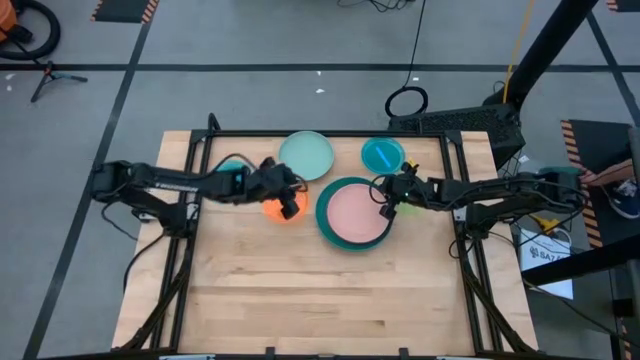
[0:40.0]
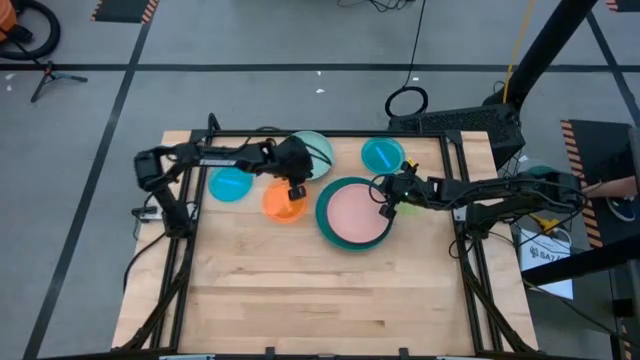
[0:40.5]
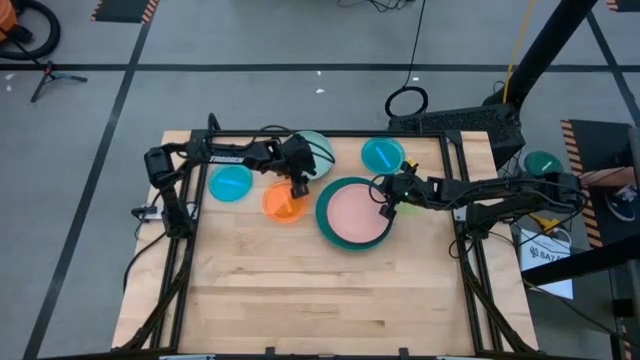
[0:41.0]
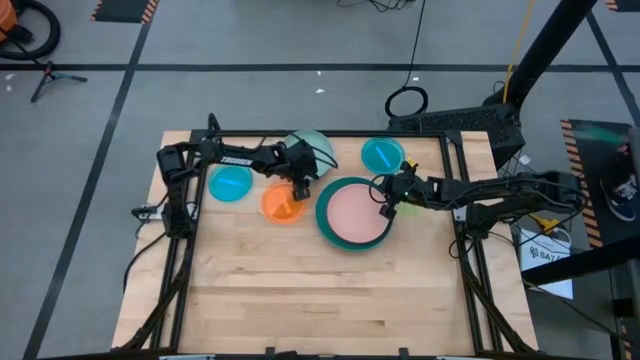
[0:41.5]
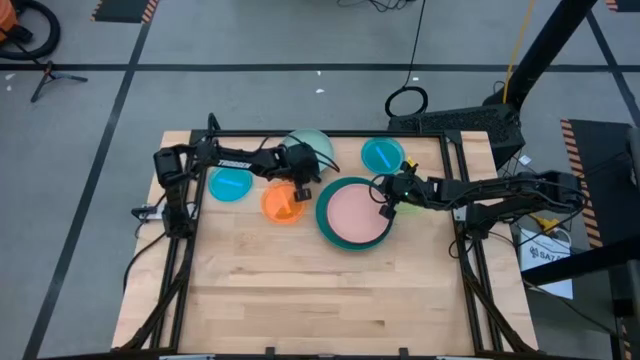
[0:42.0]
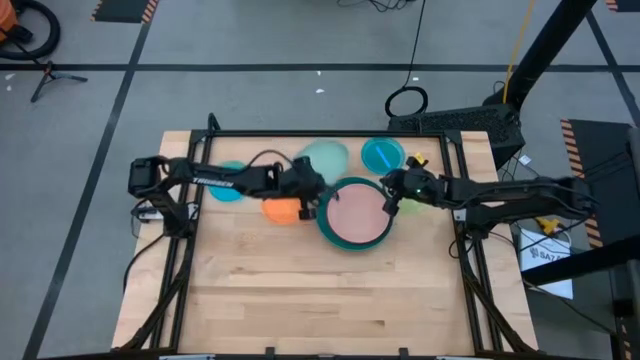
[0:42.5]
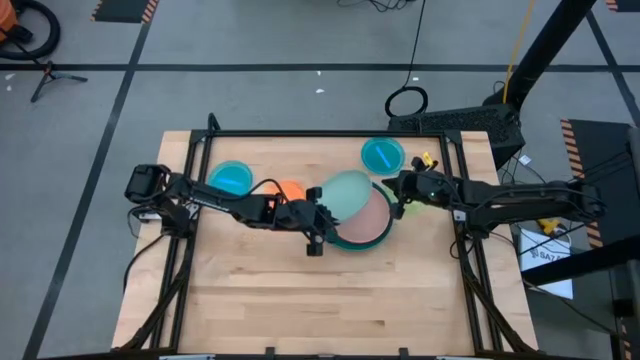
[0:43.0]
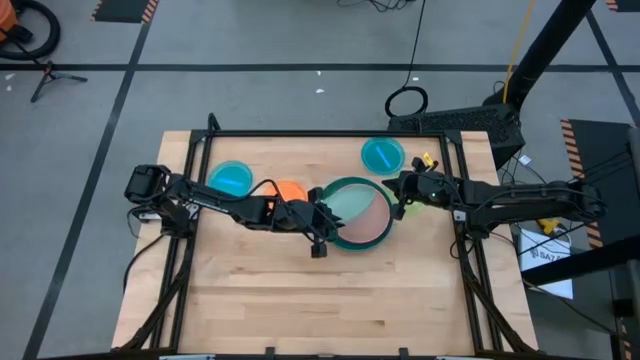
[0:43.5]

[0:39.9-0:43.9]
Task: Stack plastic plates
Stack the light blue plate on top of the pink plate

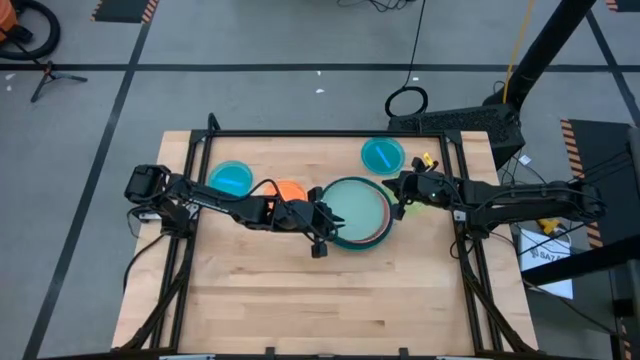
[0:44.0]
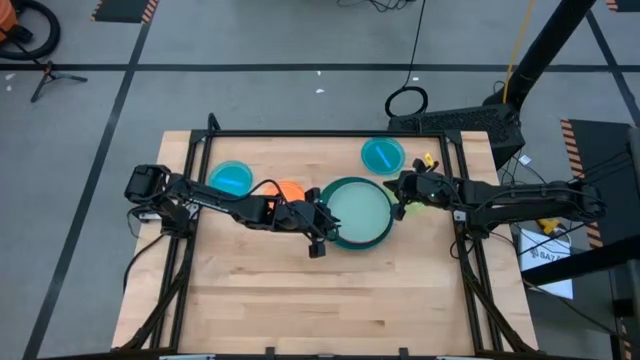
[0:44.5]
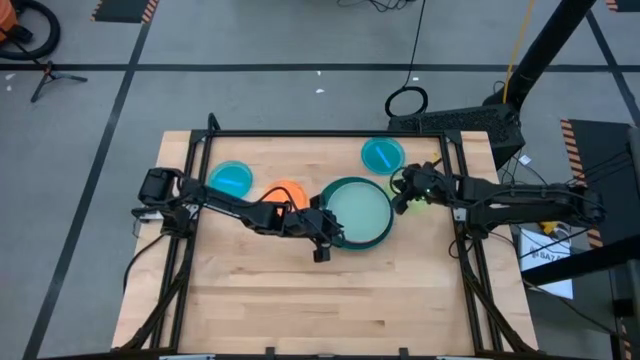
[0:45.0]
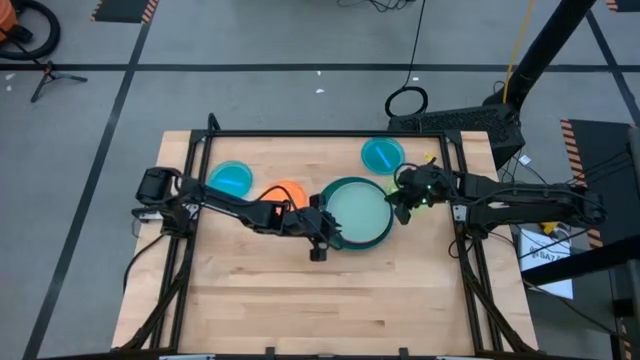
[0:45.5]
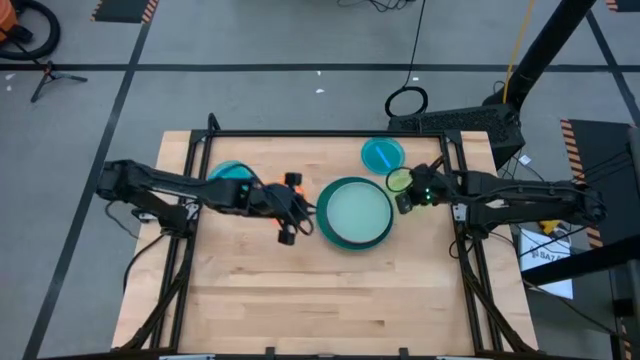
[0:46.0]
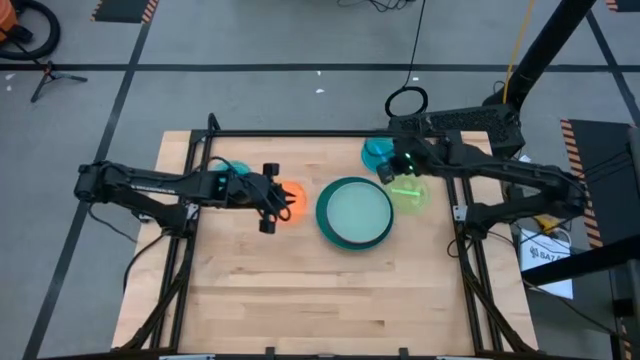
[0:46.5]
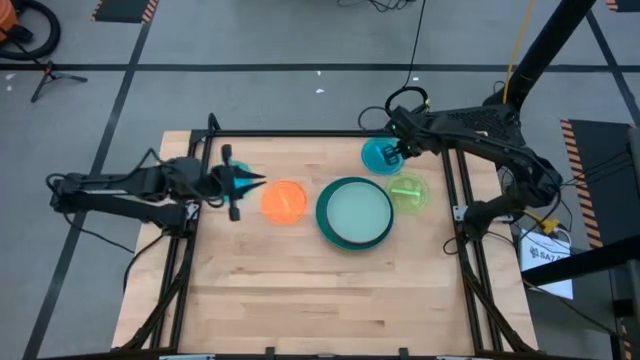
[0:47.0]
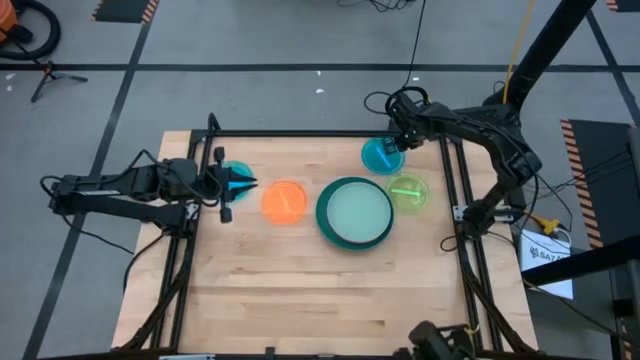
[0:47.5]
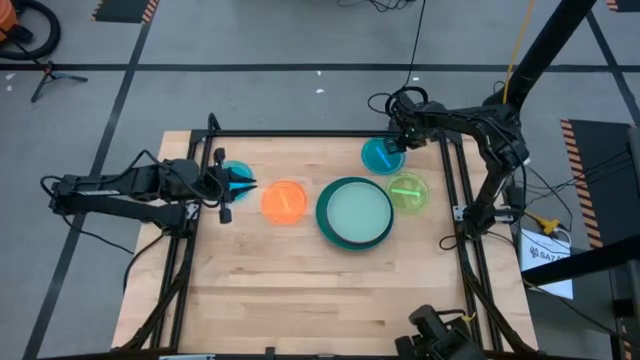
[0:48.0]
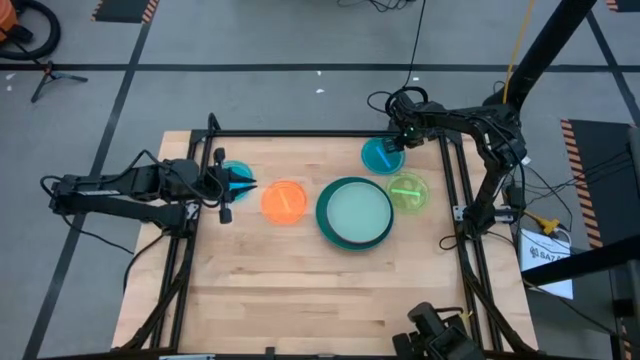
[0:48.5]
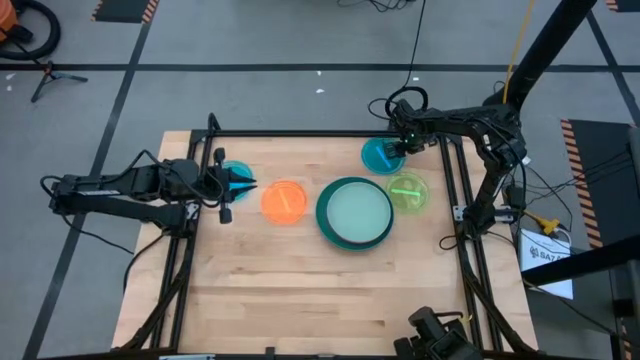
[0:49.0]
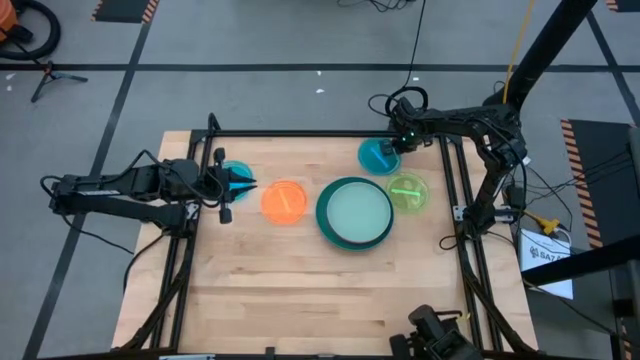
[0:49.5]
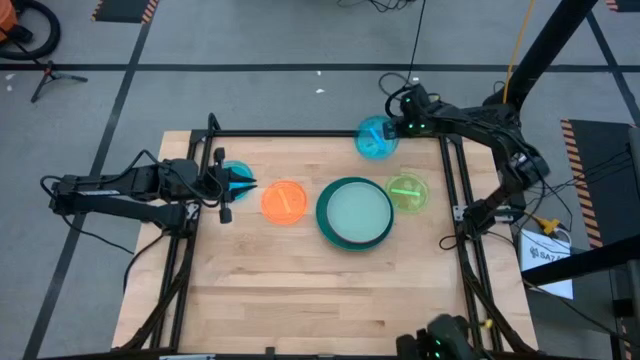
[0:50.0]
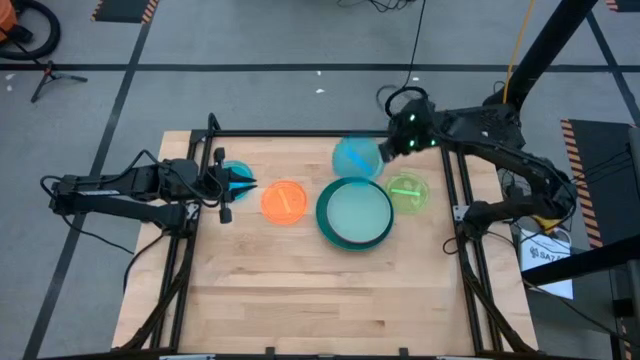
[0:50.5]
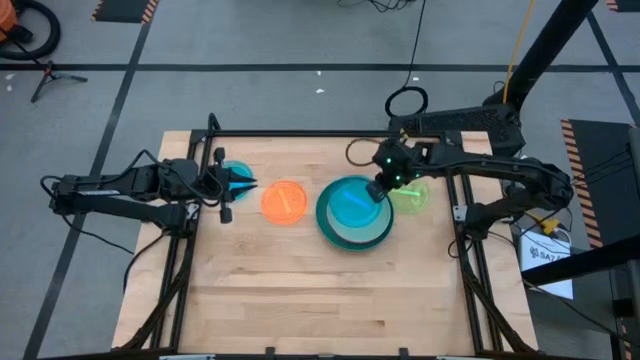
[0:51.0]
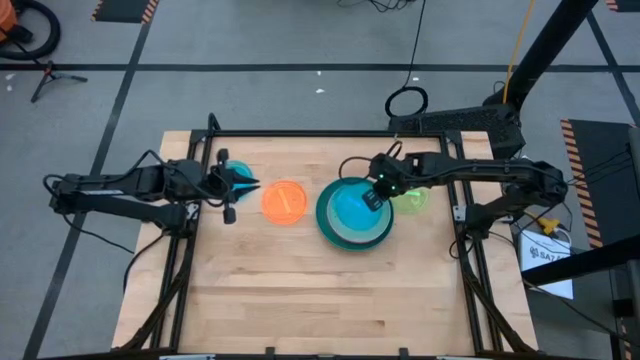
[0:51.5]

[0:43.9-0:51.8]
Stack the right blue plate on top of the light blue plate

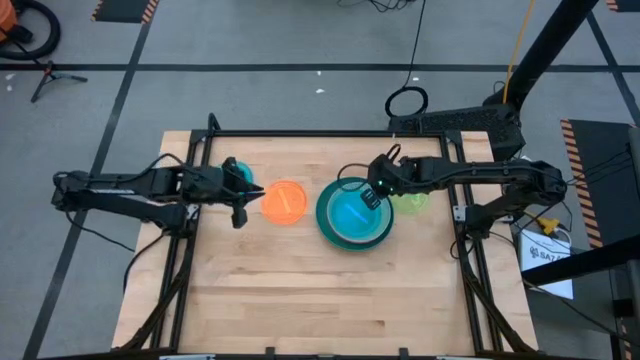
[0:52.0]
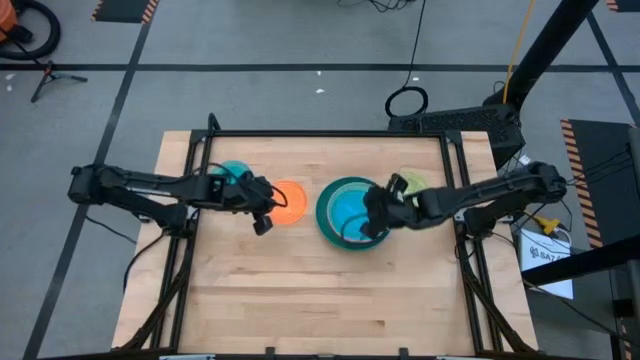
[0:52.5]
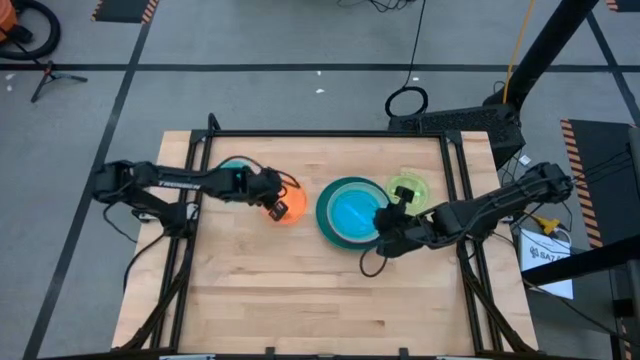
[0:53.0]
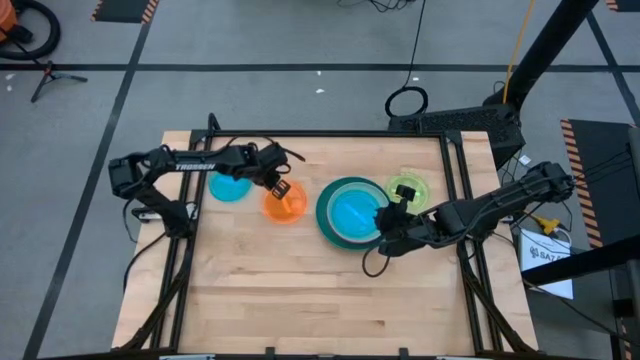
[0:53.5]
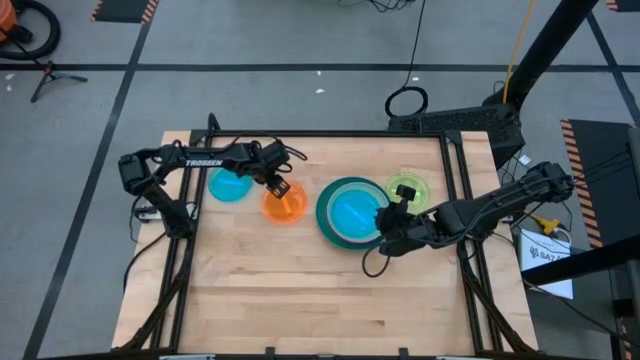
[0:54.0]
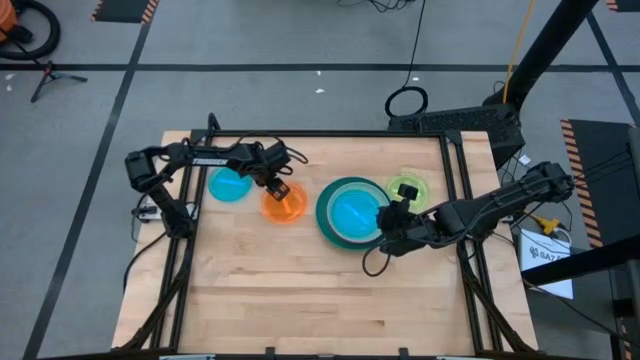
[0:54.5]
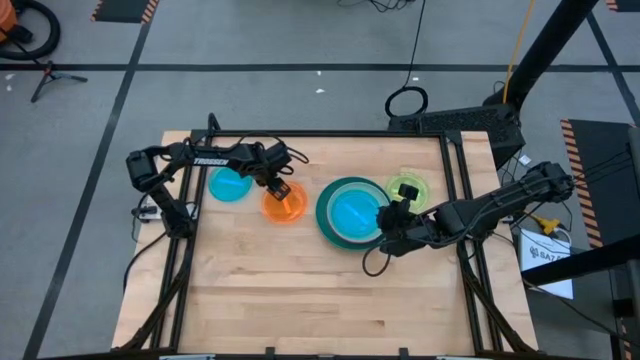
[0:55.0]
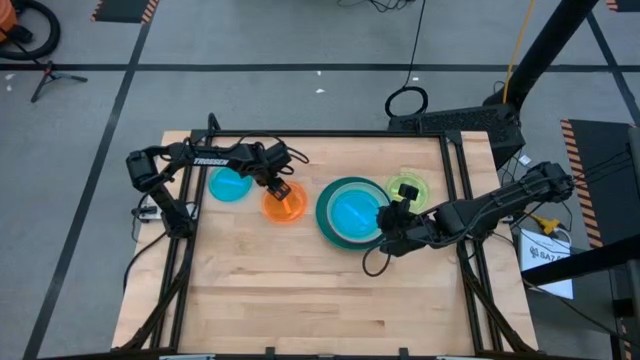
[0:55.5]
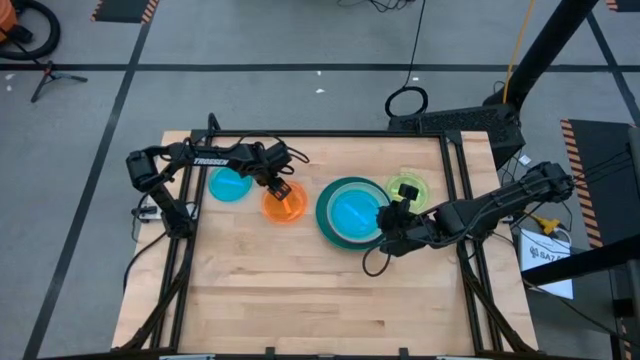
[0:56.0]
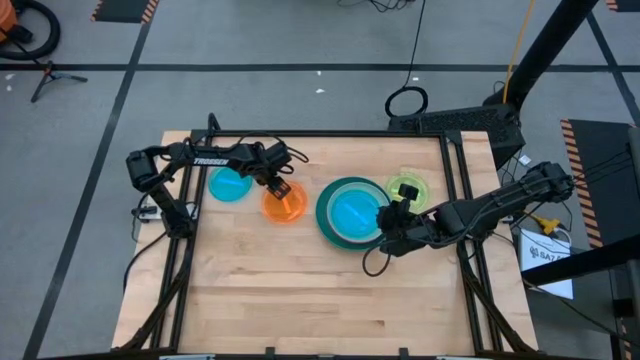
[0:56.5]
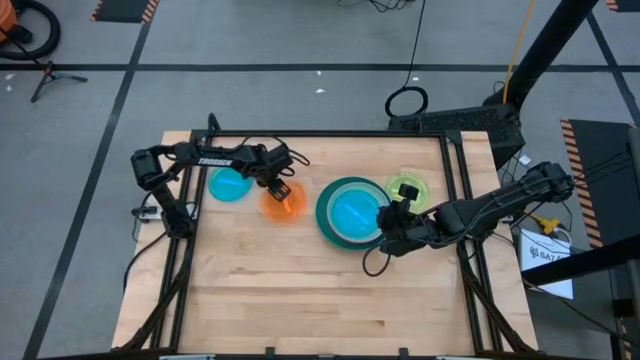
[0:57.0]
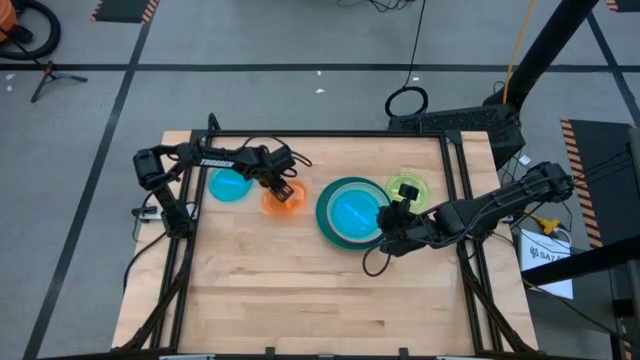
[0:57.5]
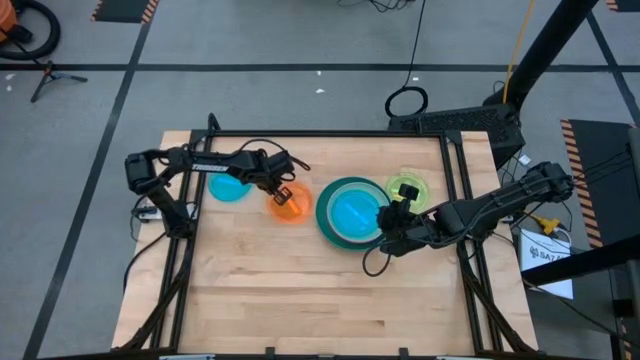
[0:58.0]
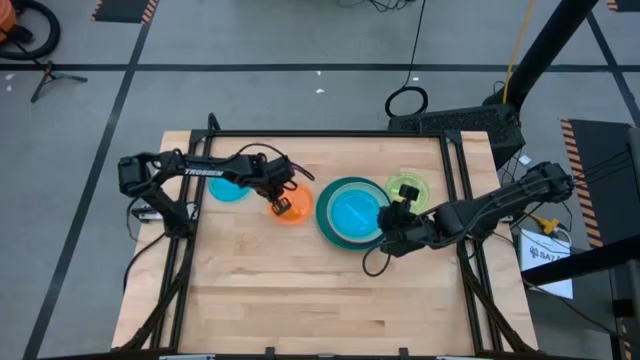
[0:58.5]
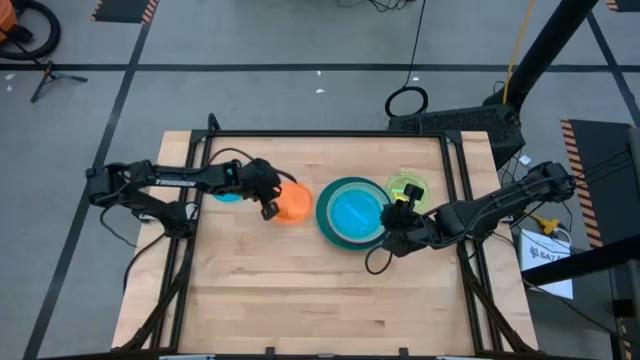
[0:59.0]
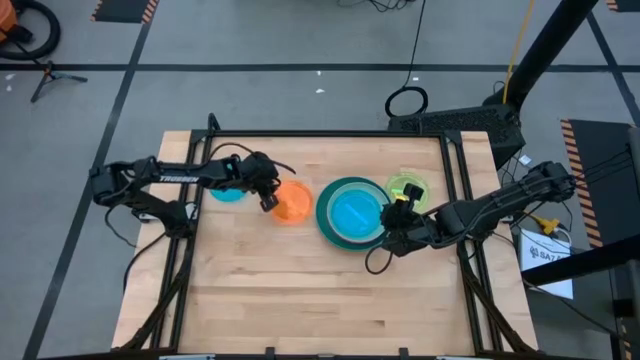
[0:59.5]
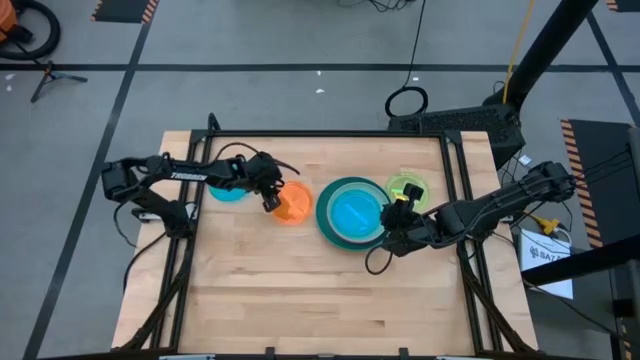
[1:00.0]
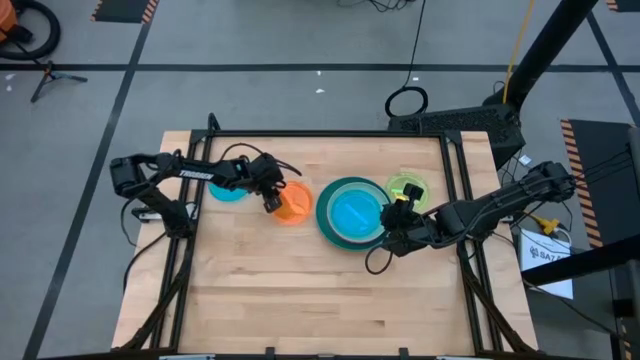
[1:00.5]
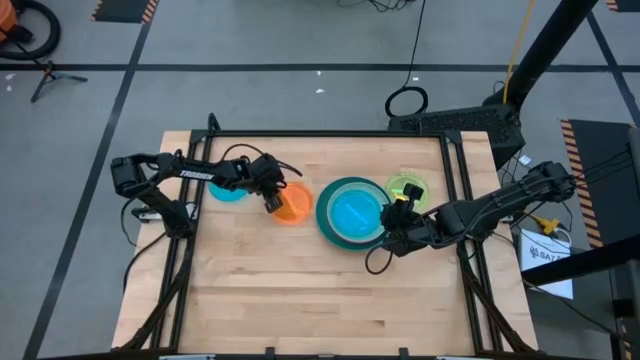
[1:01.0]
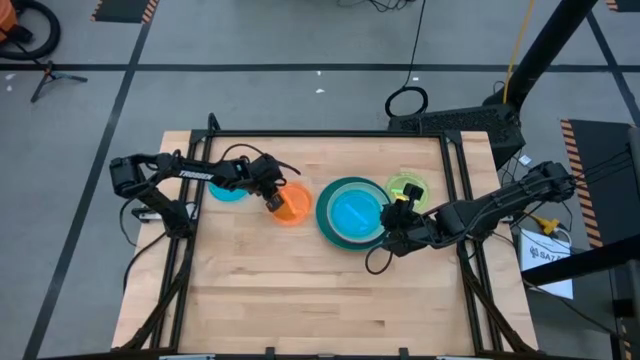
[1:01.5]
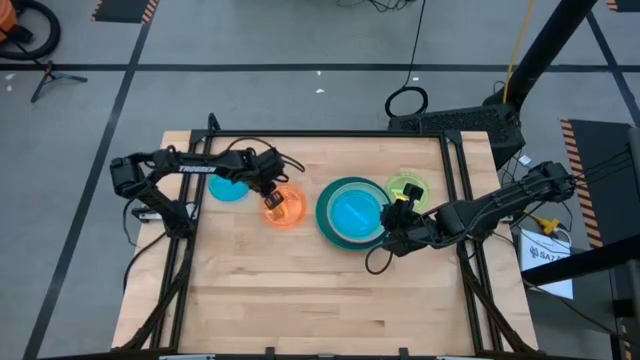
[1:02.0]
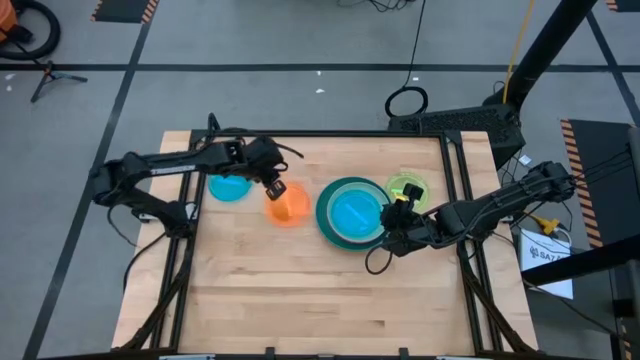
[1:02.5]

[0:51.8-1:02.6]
Stack the orange plate on top of the blue plate
